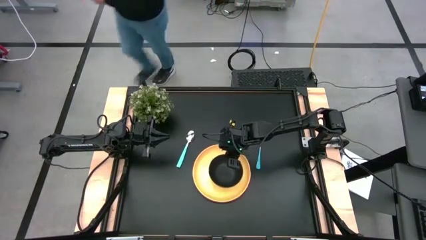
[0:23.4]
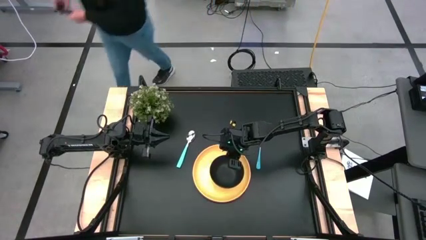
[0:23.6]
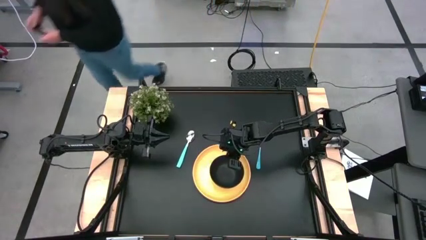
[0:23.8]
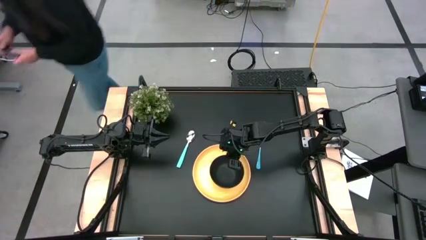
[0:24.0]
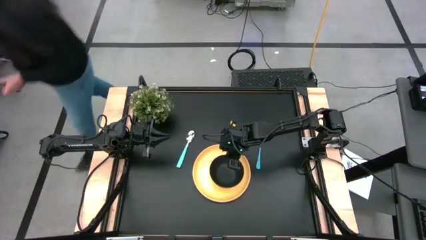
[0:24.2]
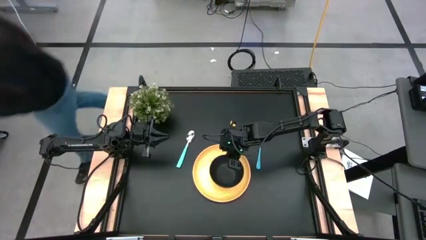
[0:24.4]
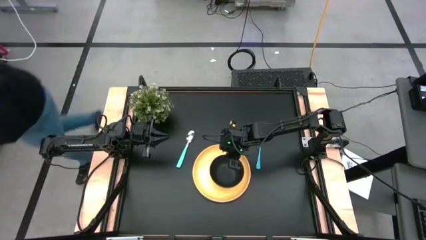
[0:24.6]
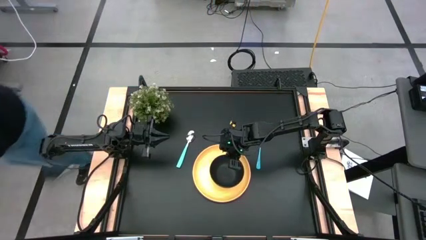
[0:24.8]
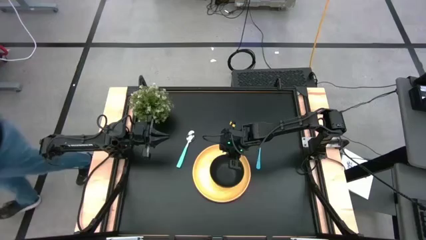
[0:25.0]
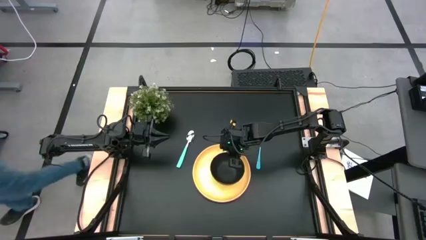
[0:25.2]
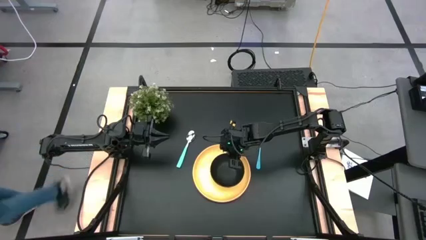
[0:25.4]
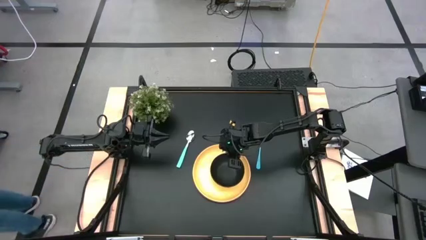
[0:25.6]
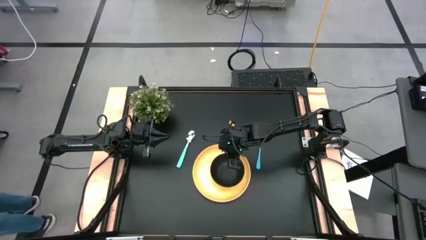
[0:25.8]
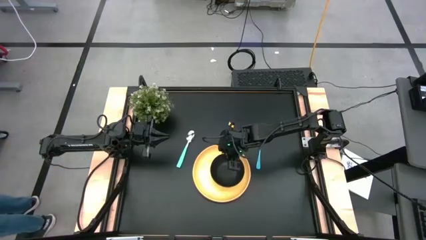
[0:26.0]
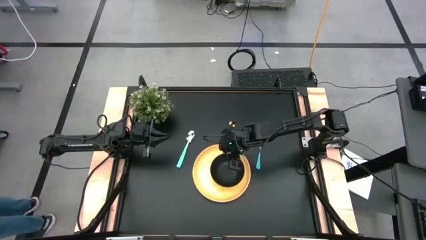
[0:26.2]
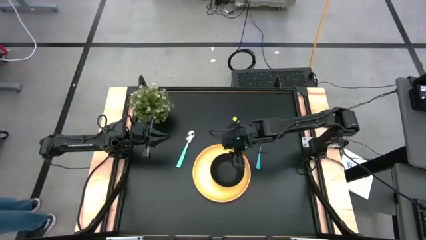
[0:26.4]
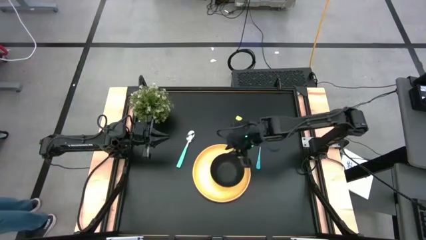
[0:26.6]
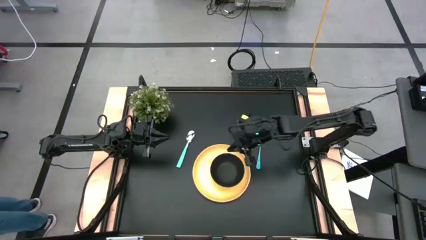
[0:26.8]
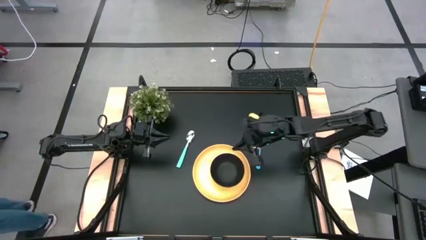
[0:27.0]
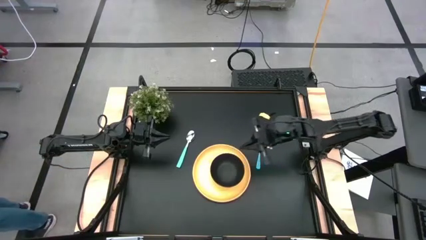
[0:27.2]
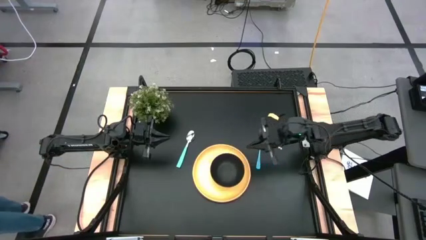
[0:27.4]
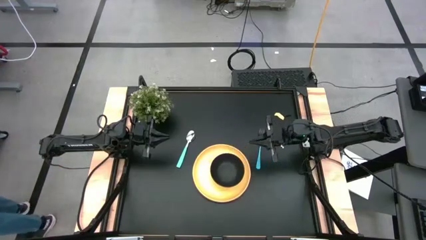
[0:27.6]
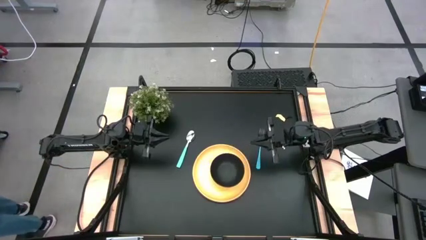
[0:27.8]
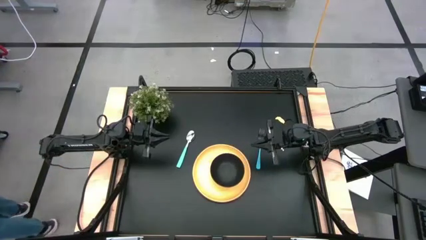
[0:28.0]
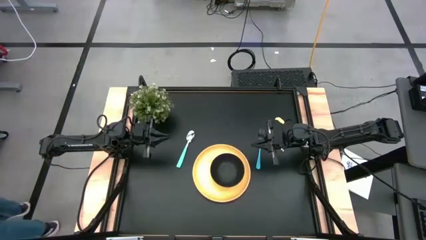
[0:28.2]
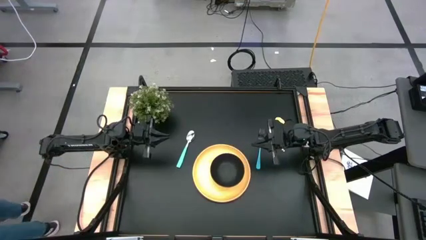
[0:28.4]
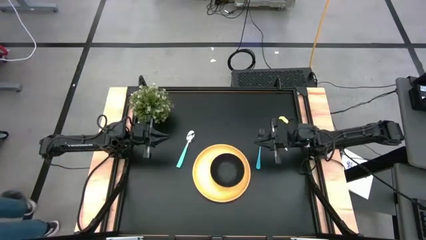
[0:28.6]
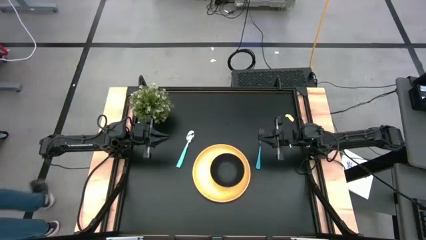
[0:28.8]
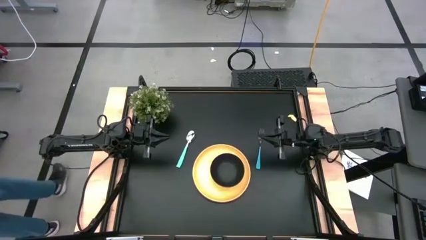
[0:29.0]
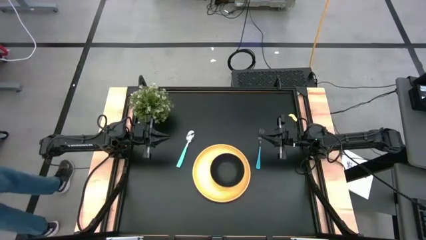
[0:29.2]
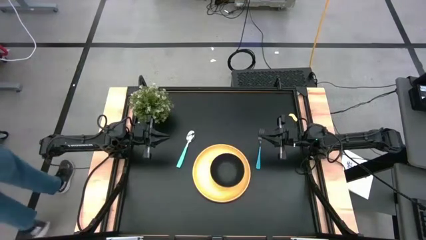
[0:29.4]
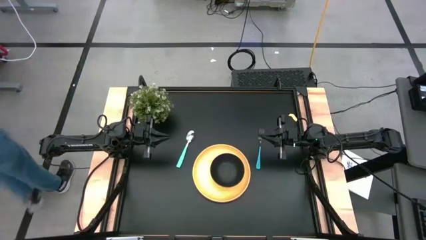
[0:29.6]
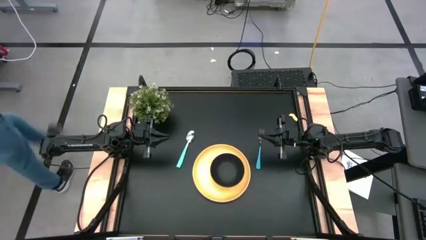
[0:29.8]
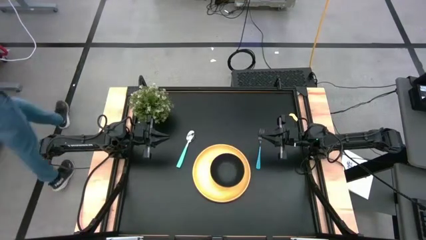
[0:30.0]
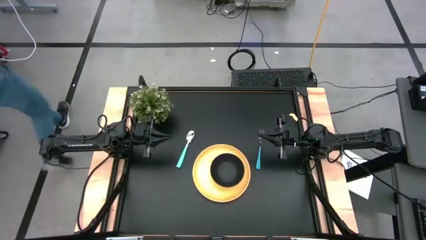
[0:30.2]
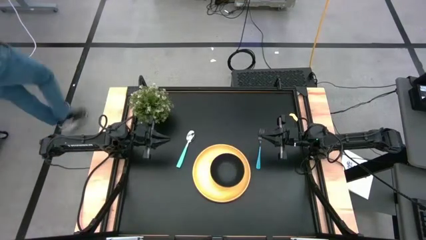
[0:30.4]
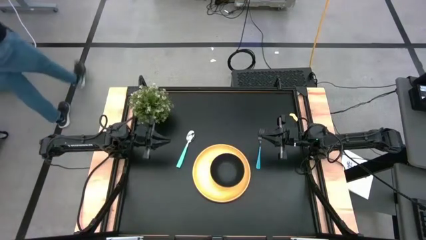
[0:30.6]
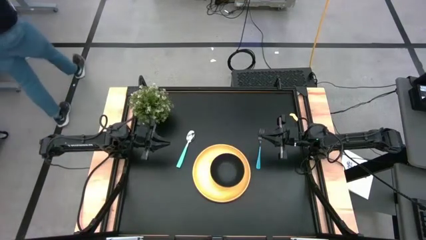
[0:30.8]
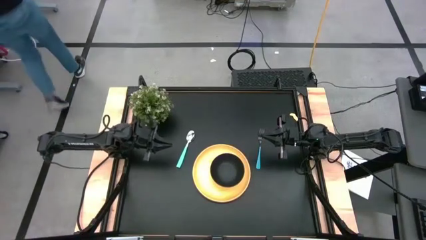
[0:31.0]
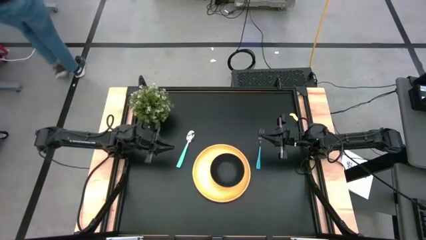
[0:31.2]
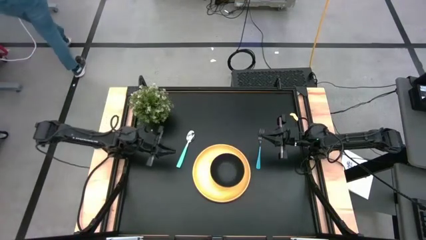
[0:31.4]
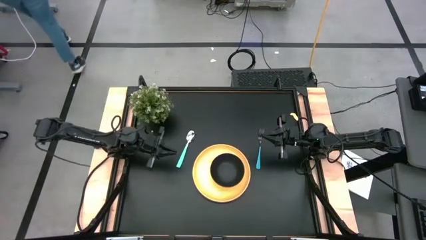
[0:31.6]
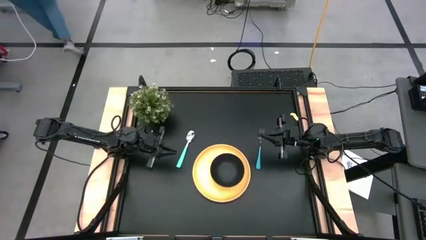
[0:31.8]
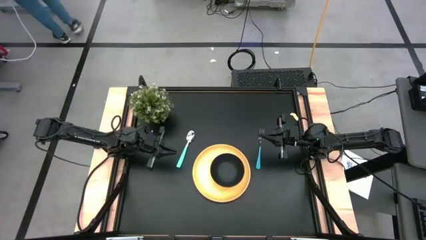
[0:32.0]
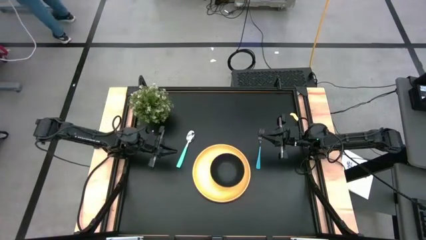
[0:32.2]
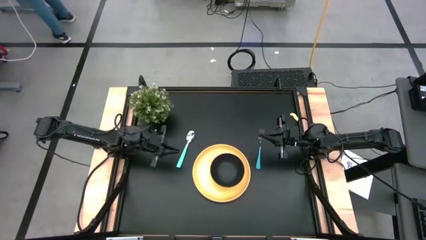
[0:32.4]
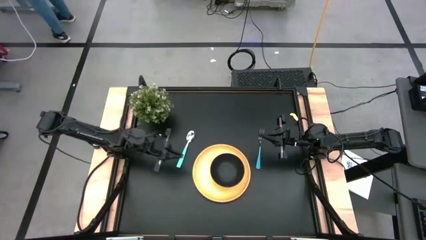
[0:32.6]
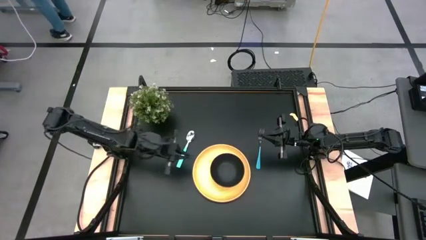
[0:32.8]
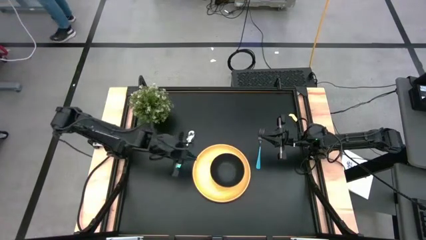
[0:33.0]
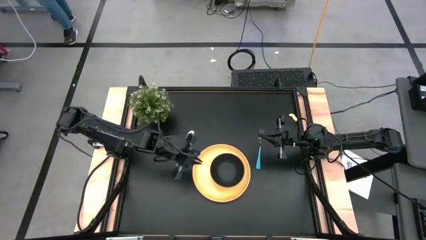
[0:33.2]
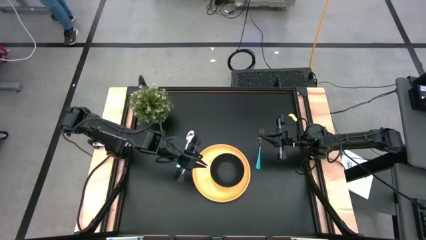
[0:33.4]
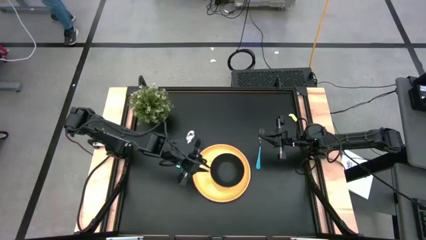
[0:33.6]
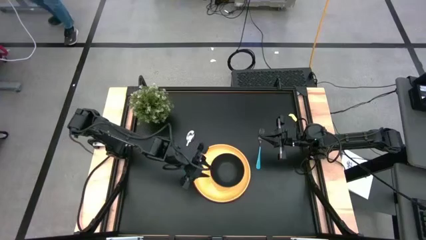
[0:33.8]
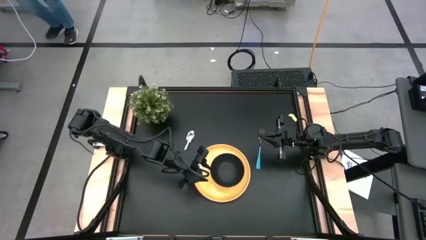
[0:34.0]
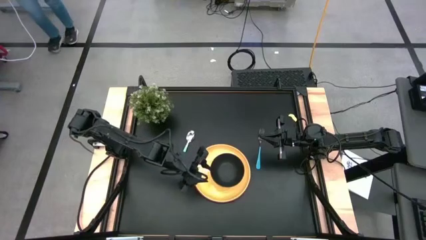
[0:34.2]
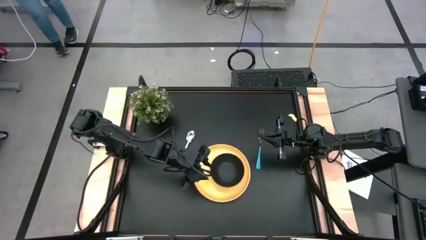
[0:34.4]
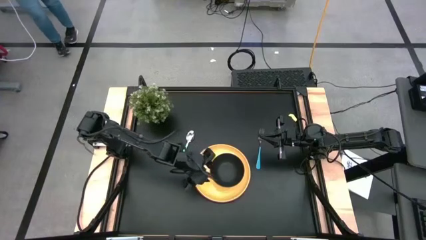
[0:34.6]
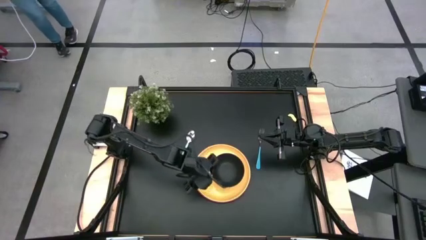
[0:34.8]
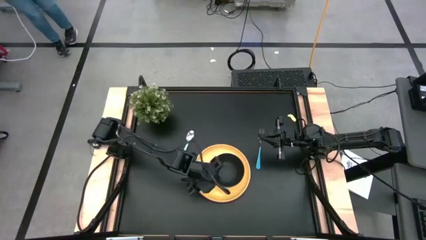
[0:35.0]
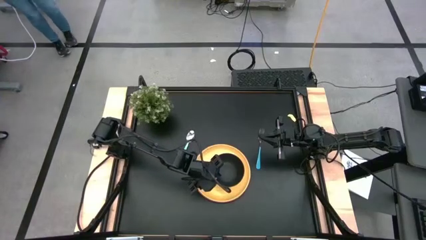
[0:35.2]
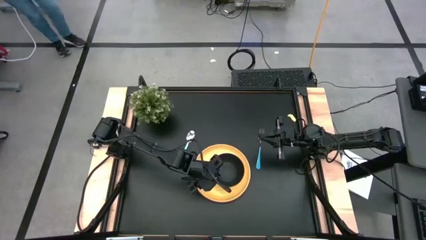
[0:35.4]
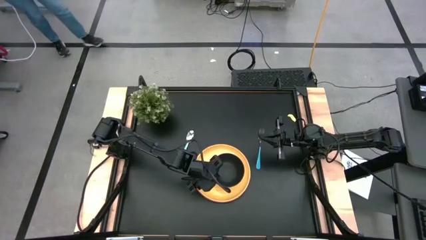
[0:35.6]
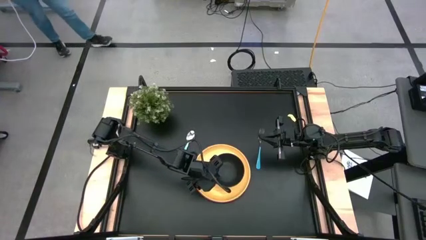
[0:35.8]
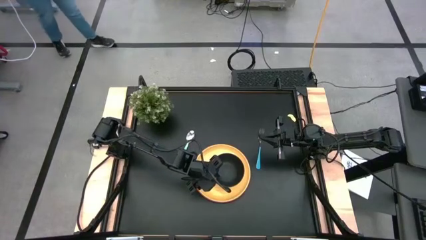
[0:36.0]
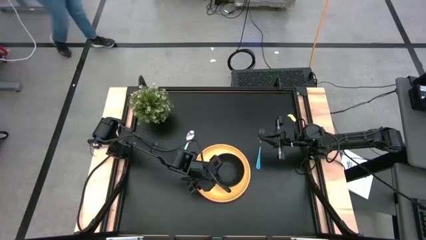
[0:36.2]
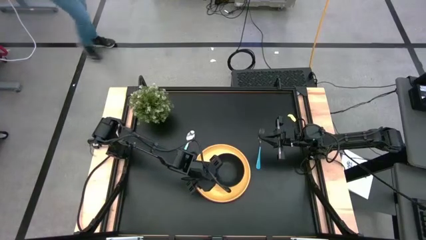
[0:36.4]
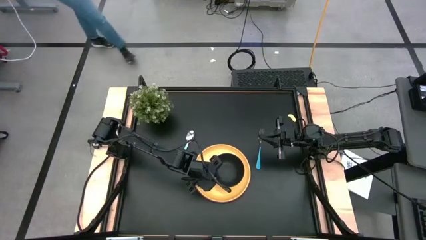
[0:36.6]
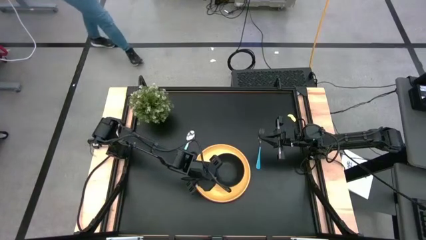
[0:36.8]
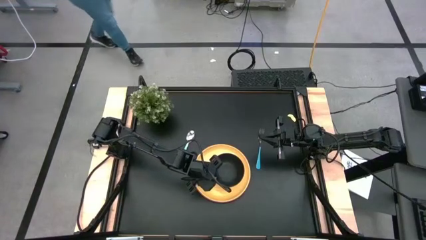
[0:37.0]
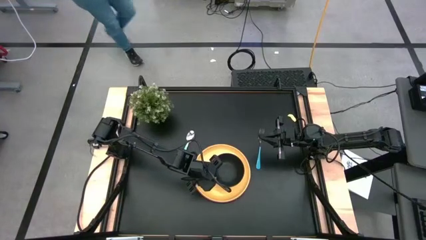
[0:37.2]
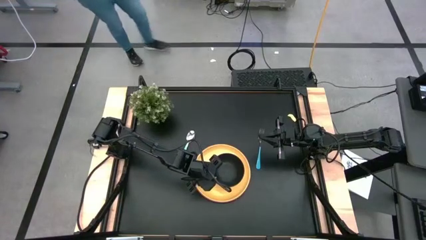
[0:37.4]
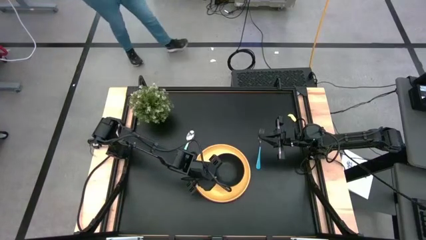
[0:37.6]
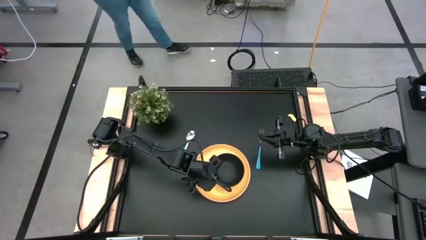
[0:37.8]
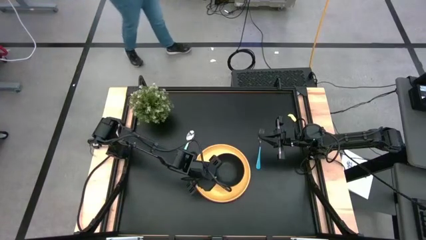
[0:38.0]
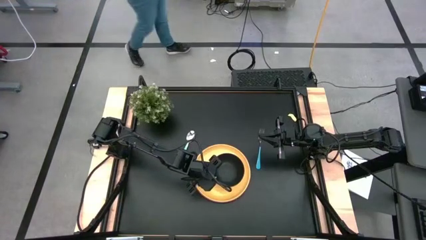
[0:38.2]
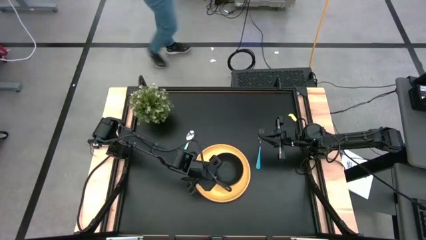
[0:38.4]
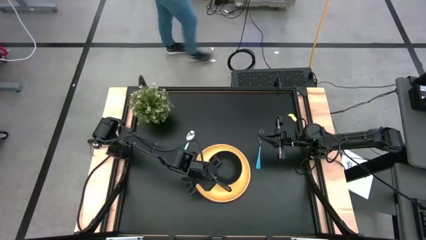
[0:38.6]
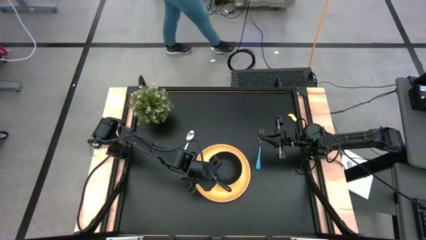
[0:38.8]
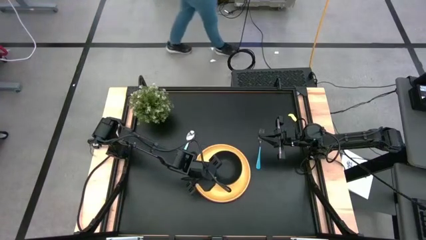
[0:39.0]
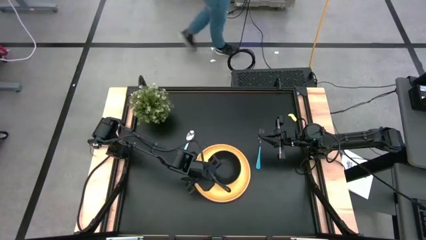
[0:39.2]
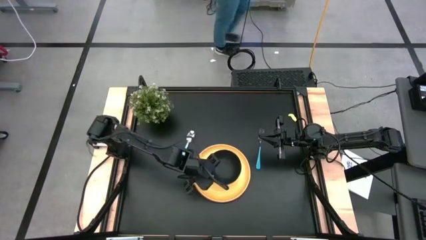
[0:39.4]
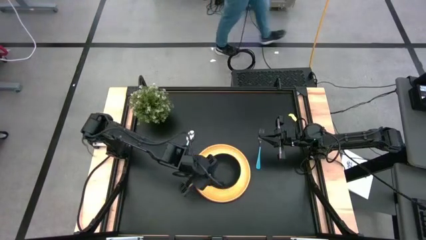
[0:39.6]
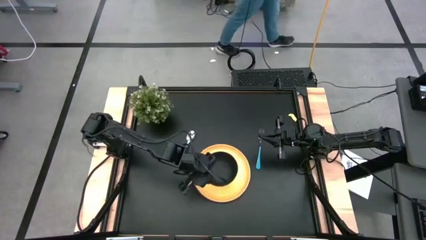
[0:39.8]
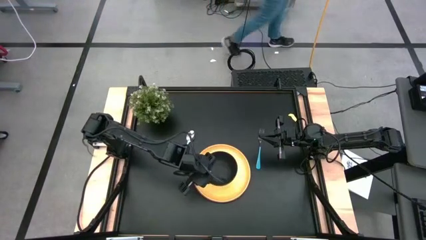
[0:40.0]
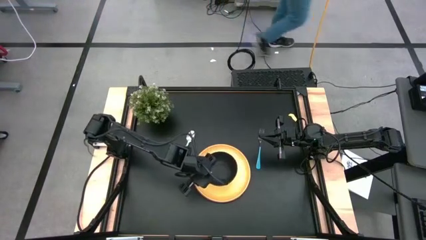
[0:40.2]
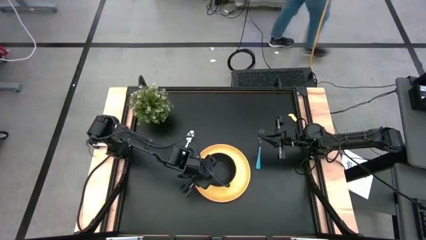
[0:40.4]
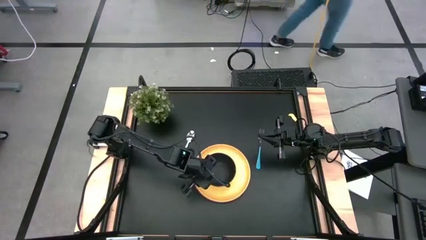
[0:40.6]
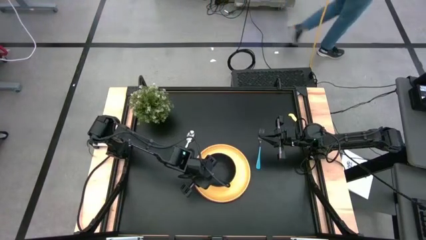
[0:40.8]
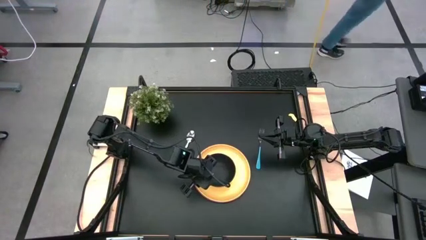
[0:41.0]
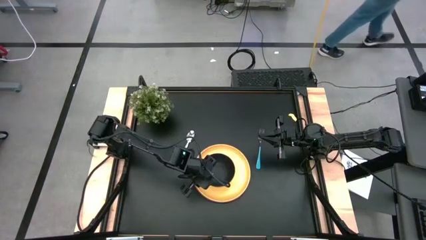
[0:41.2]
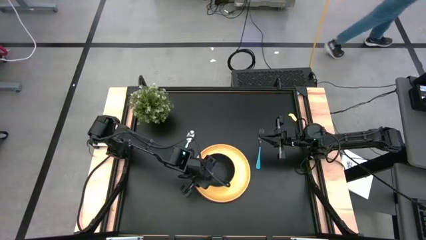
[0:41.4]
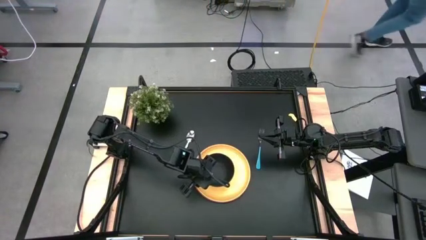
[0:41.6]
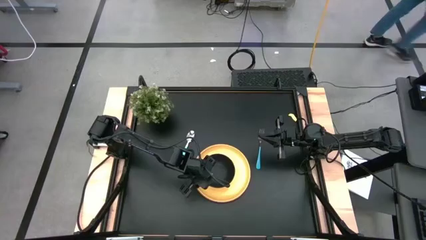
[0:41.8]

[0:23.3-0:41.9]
Task: Set table place
Put the black bowl on the yellow plate
